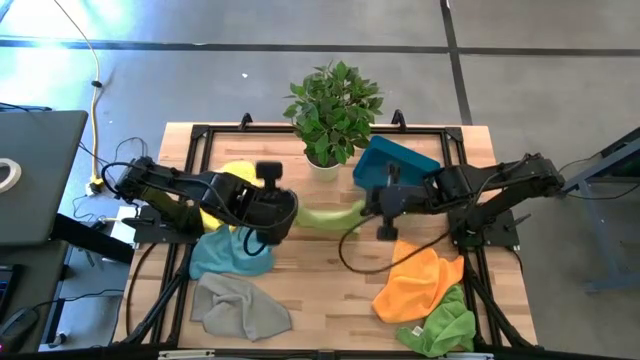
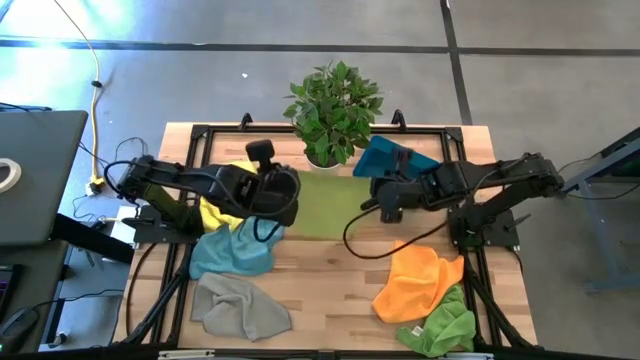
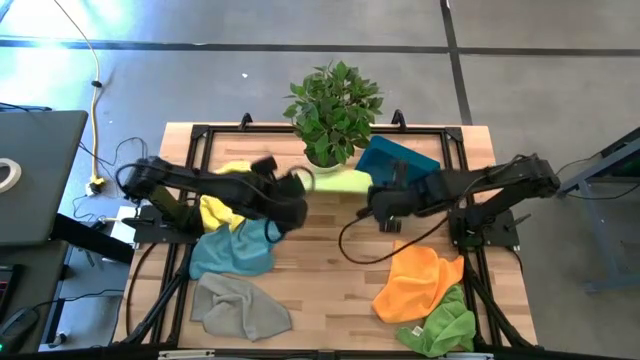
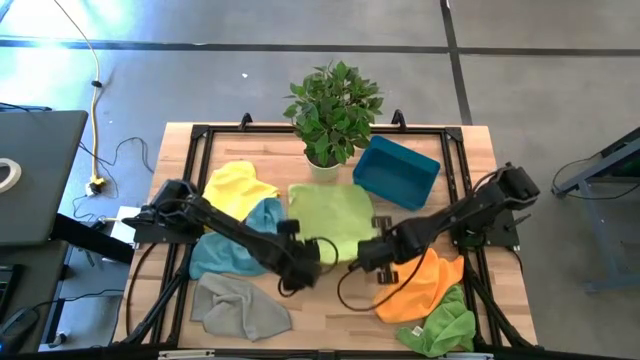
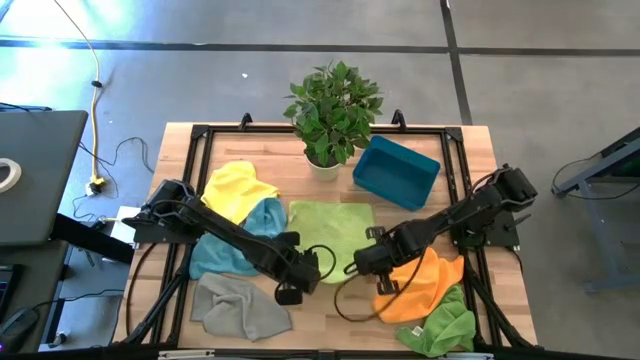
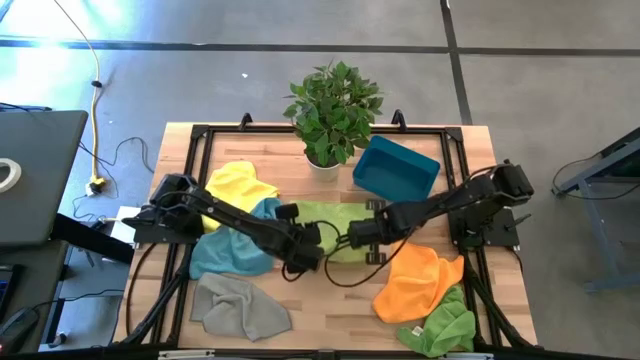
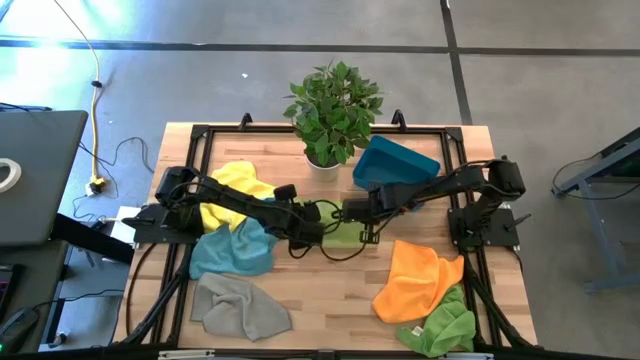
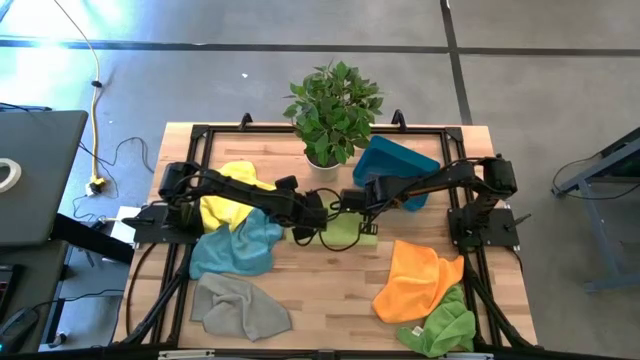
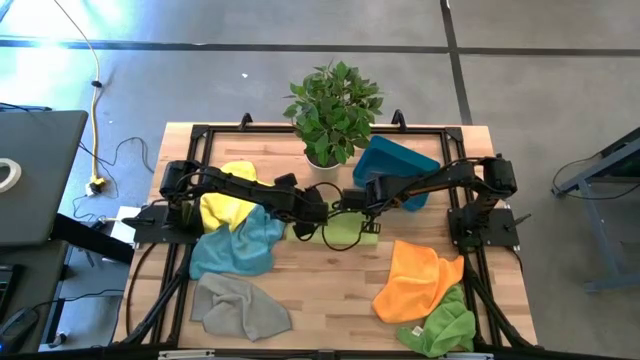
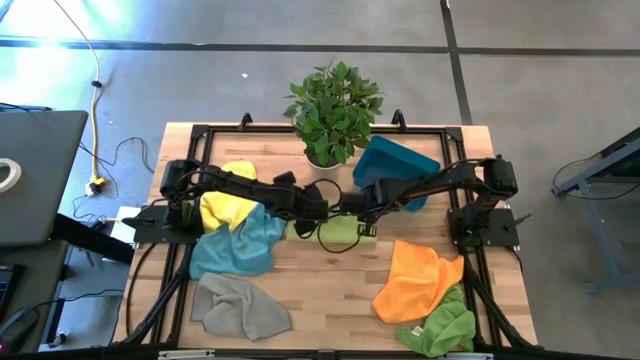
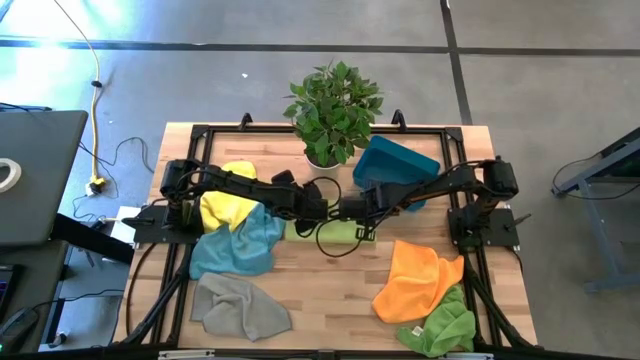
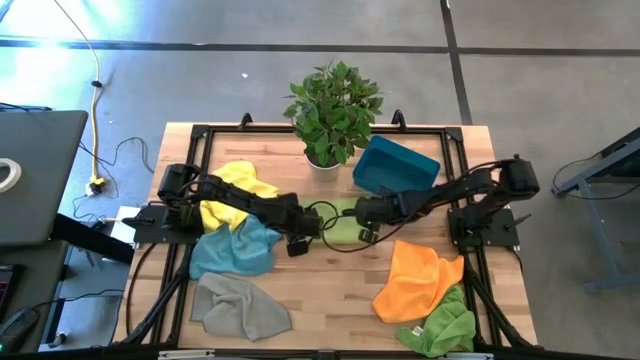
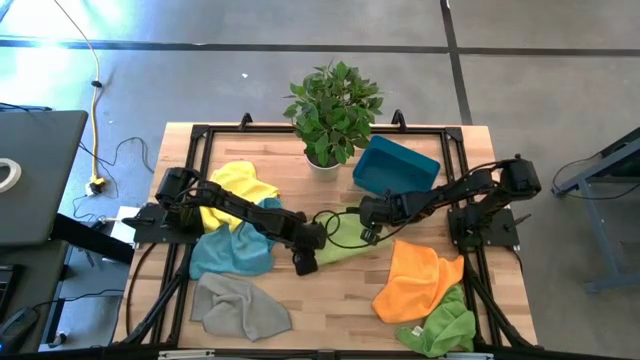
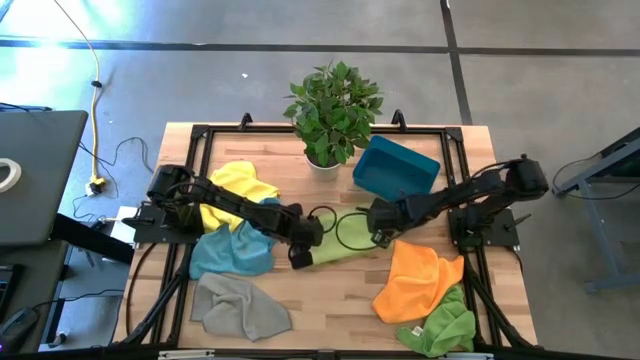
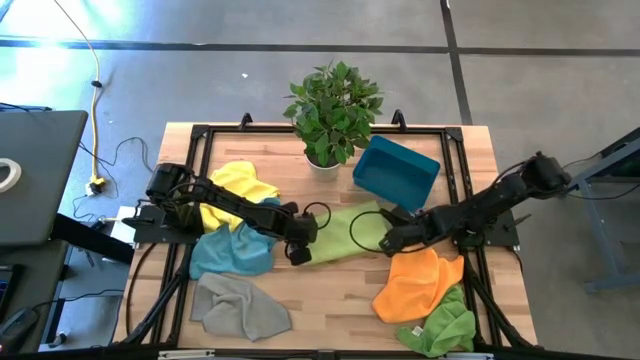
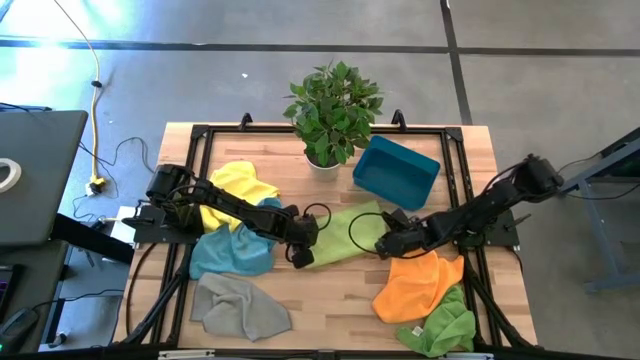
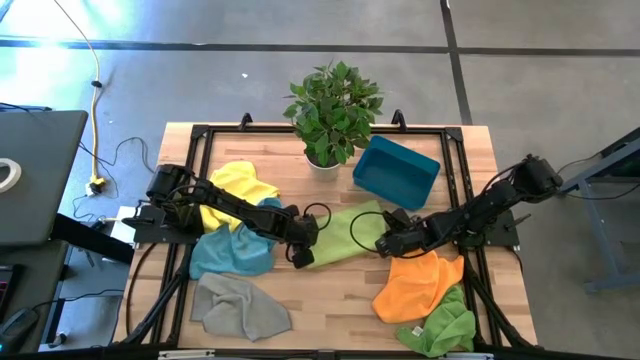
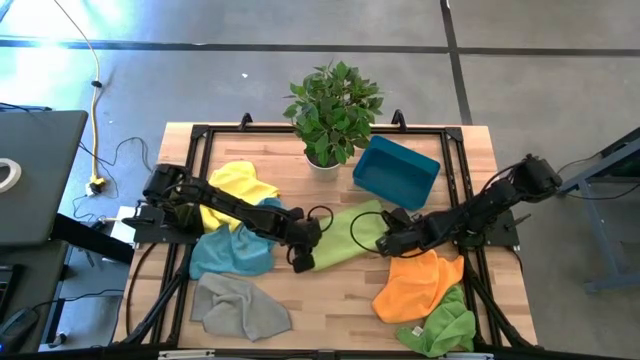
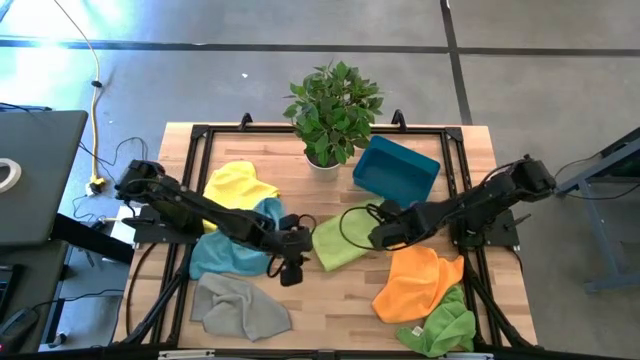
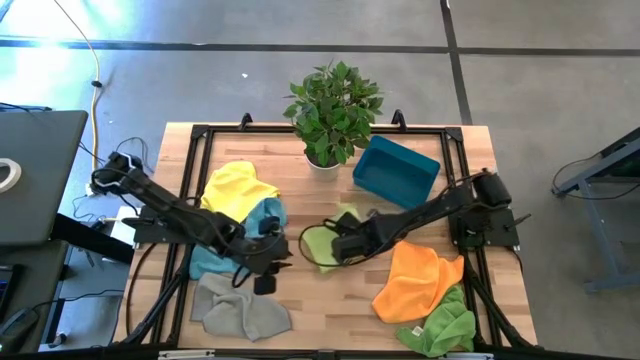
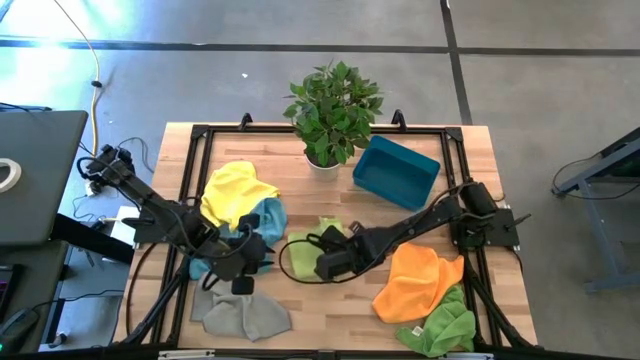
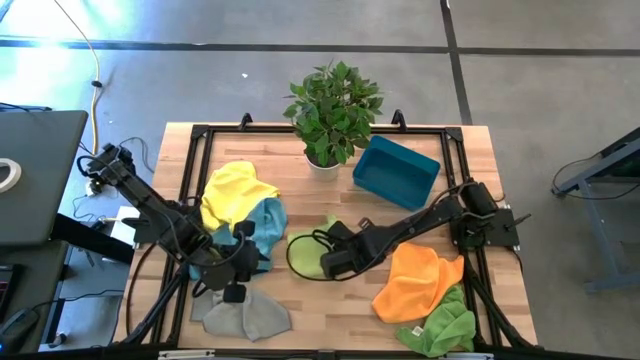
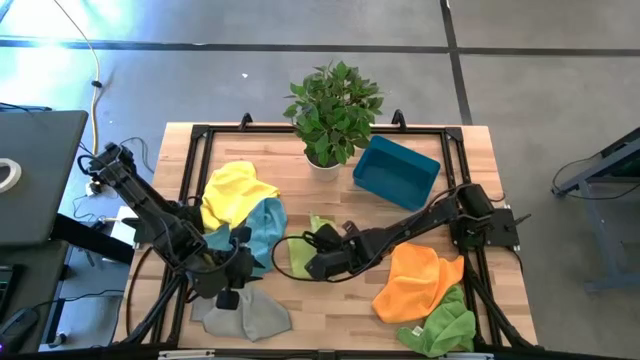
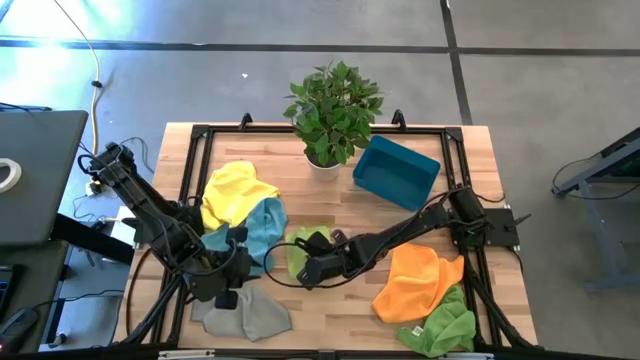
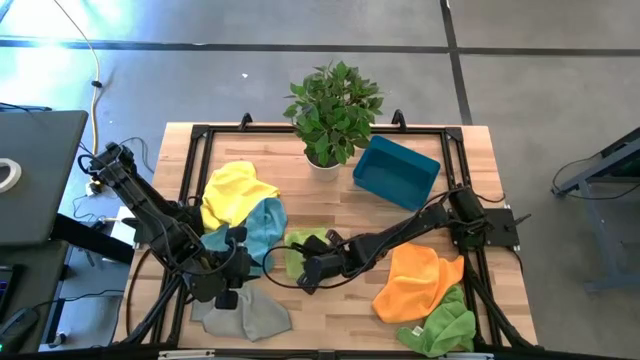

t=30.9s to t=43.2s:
Task: Fold microfiber towels
Fold the light green towel

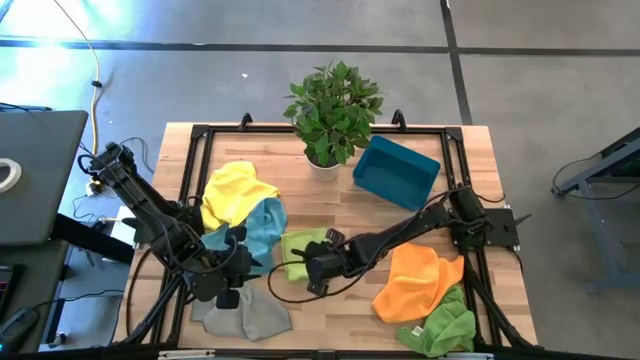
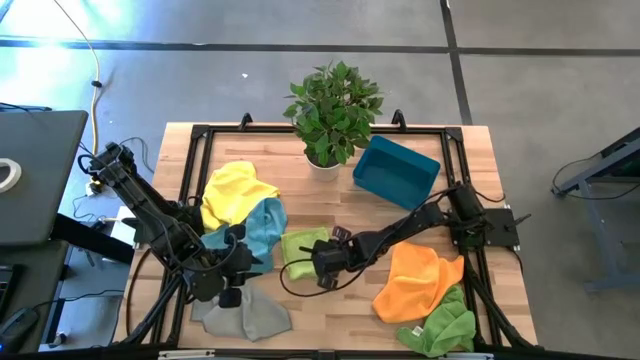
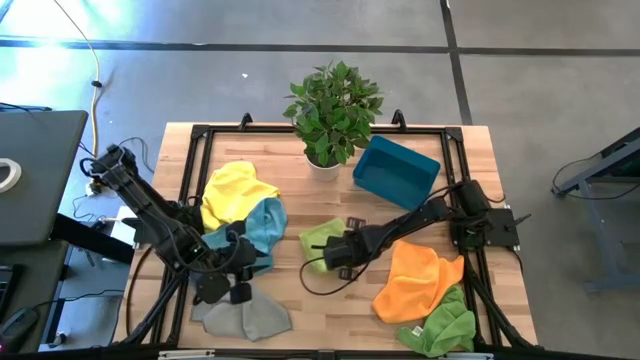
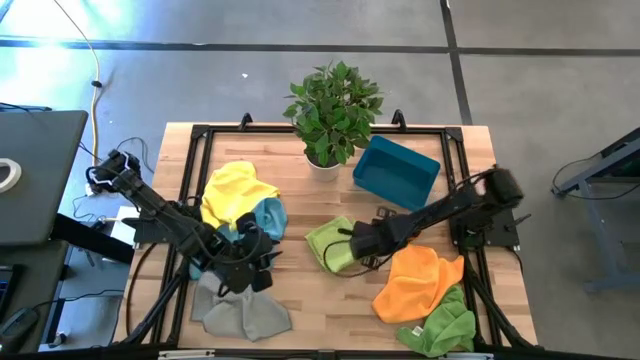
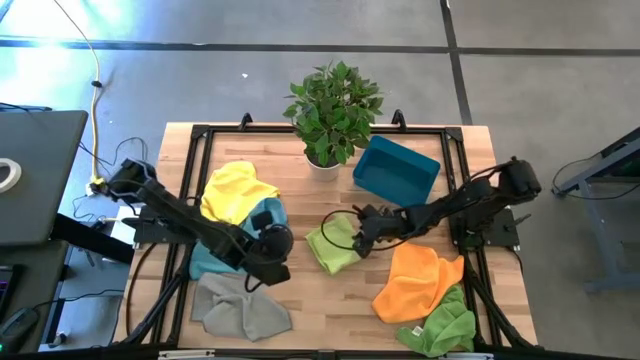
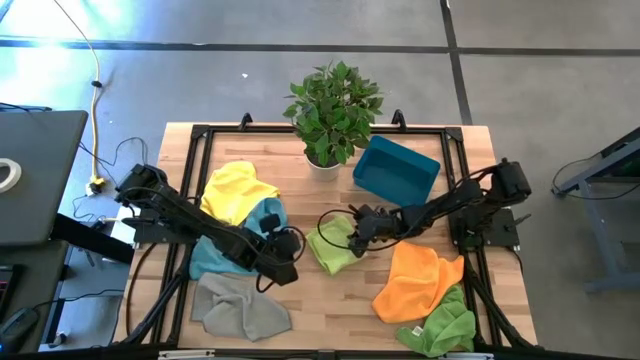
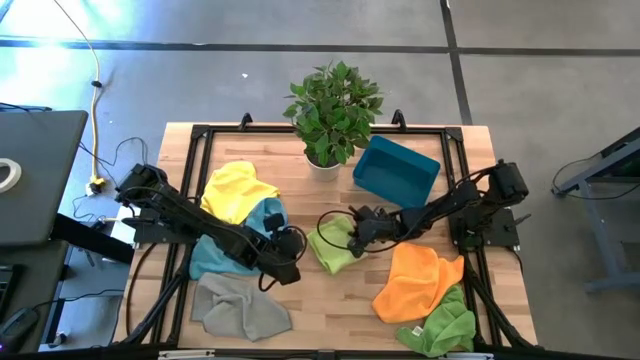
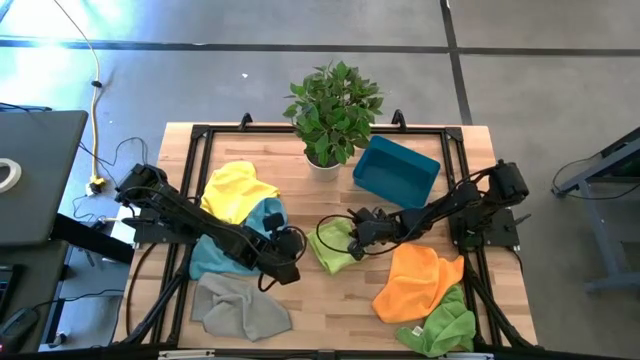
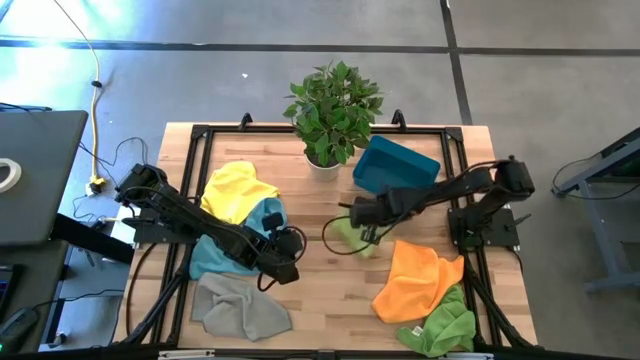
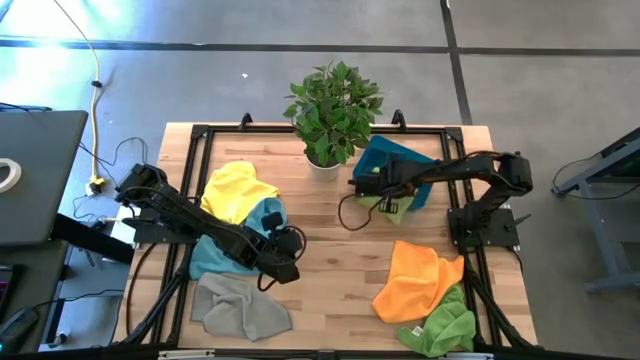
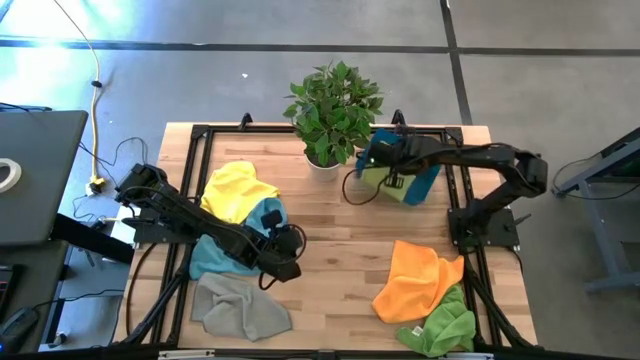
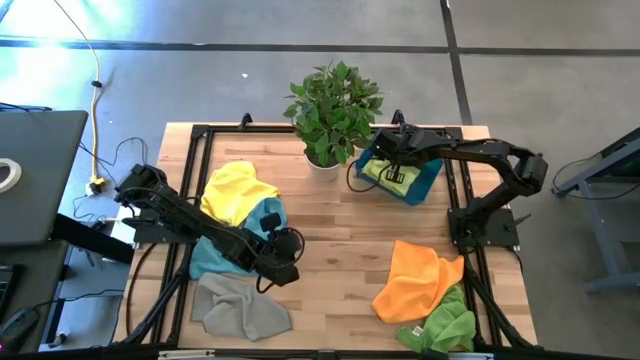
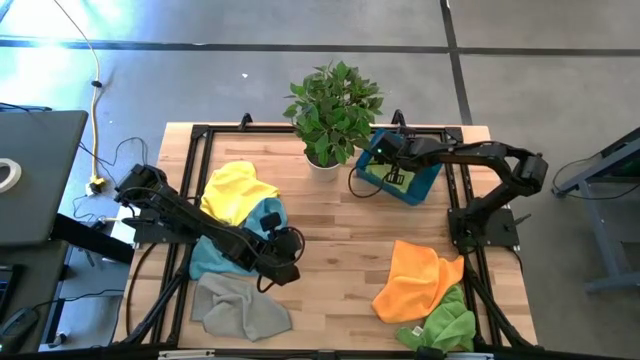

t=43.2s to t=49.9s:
Put the light green towel into the blue bin

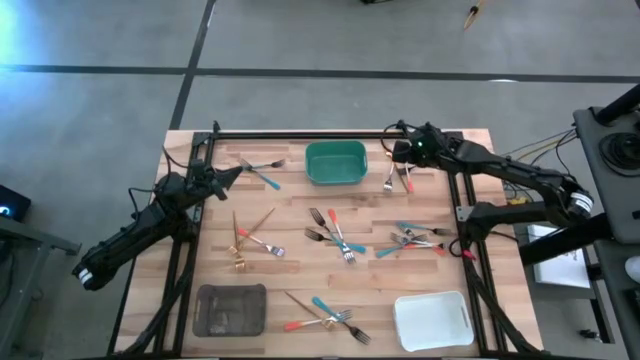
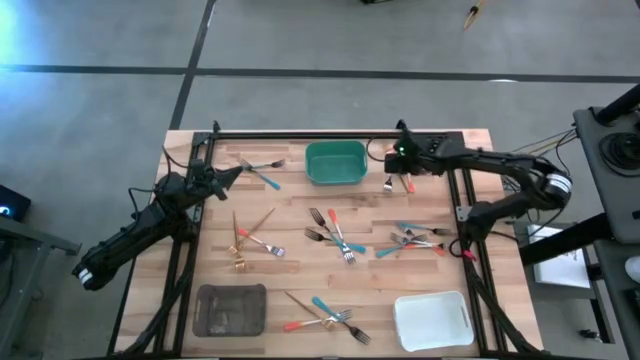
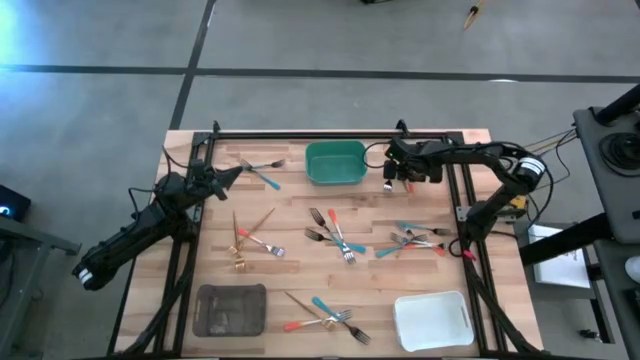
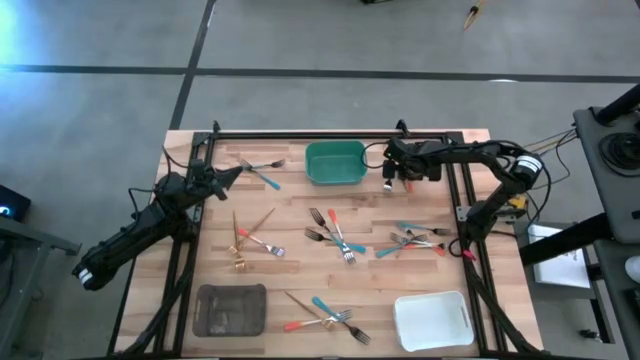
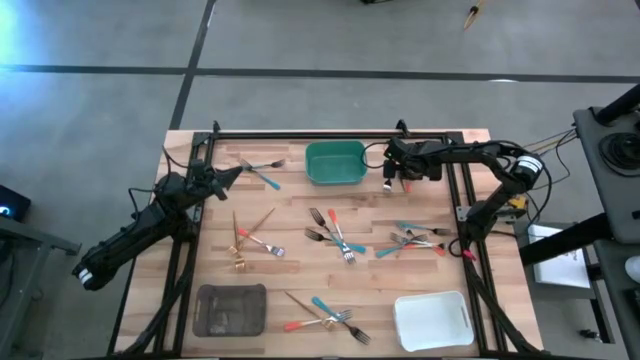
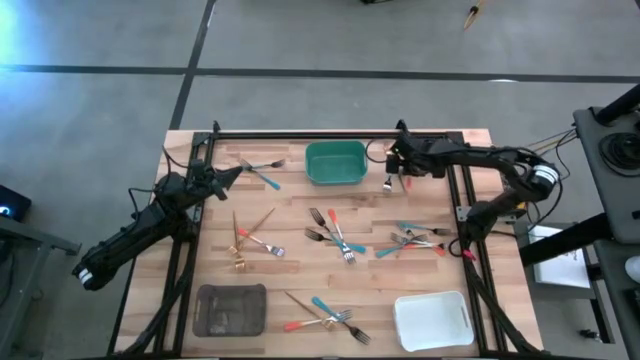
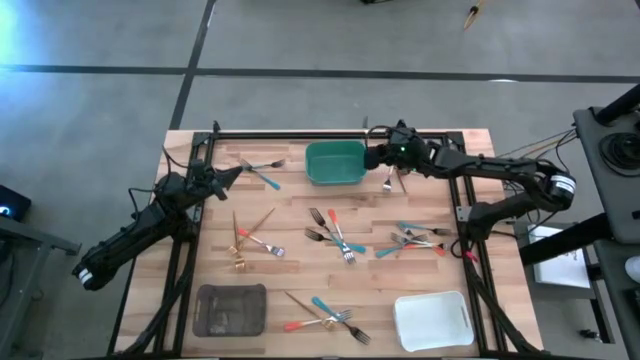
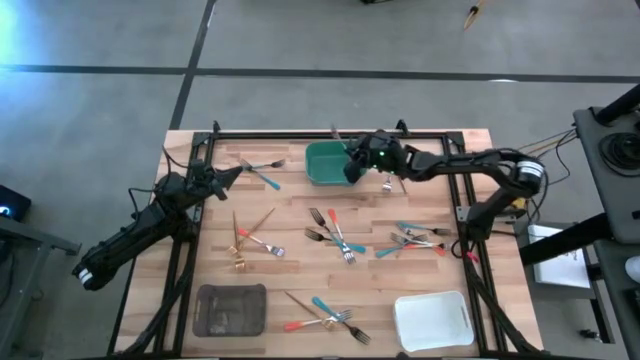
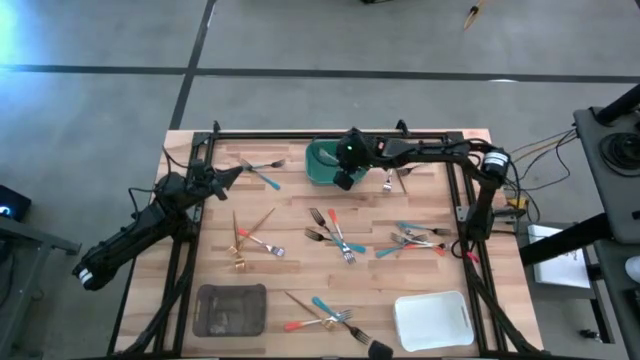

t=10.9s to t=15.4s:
Task: Sort silverware by color (type)
Put the orange fork into the green bin
